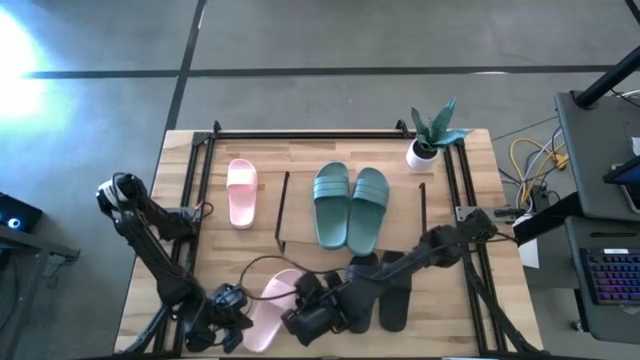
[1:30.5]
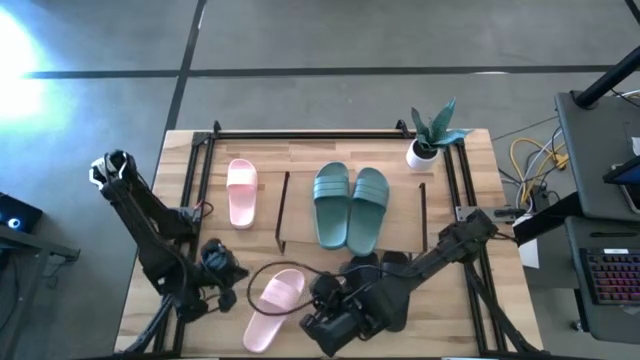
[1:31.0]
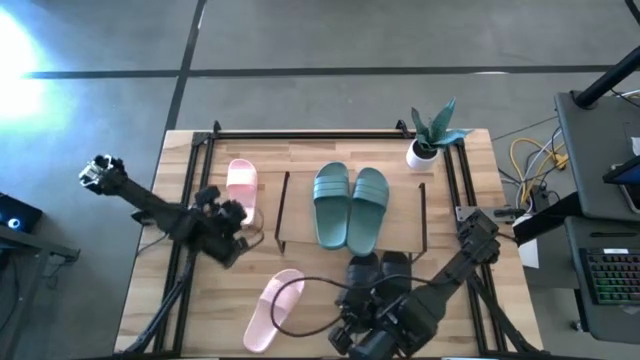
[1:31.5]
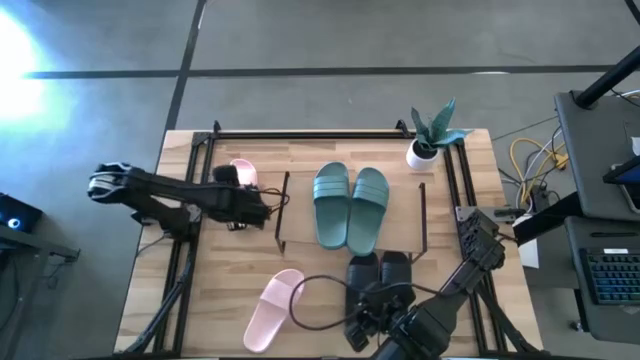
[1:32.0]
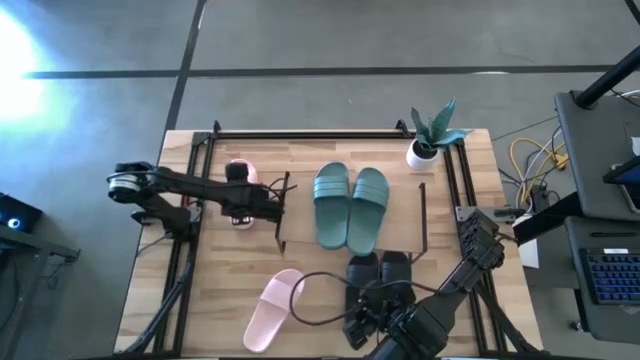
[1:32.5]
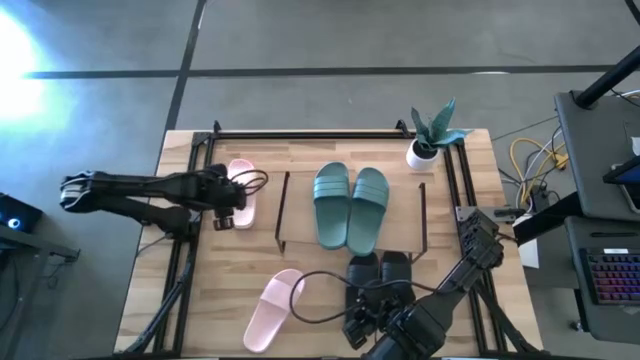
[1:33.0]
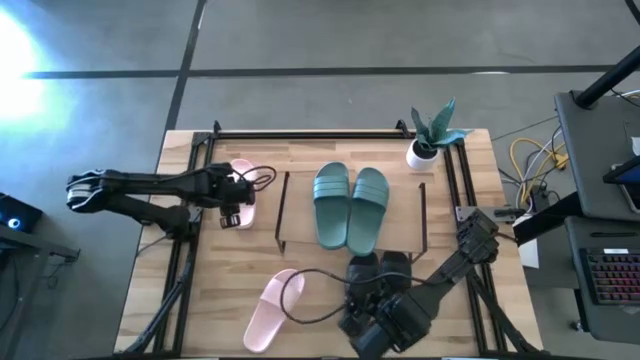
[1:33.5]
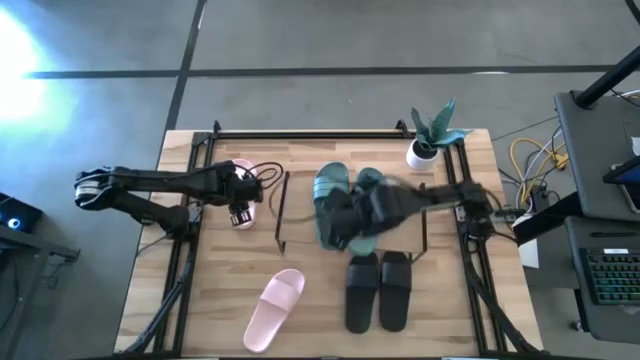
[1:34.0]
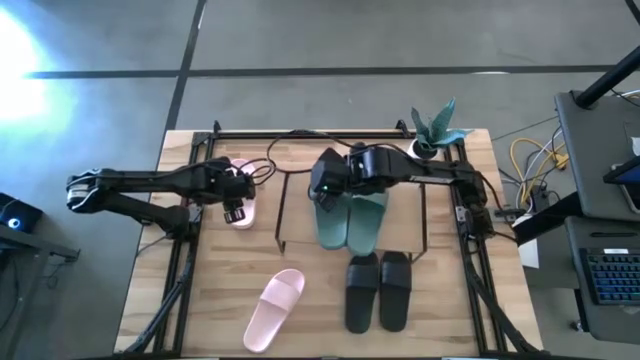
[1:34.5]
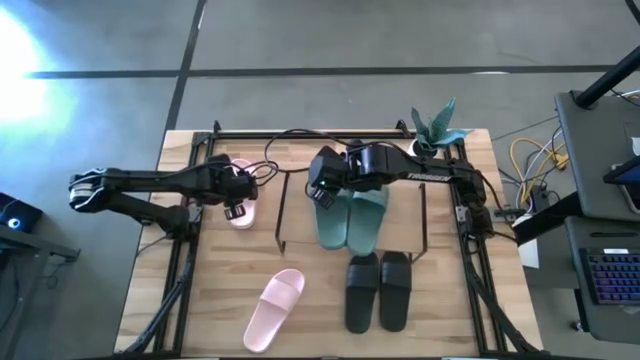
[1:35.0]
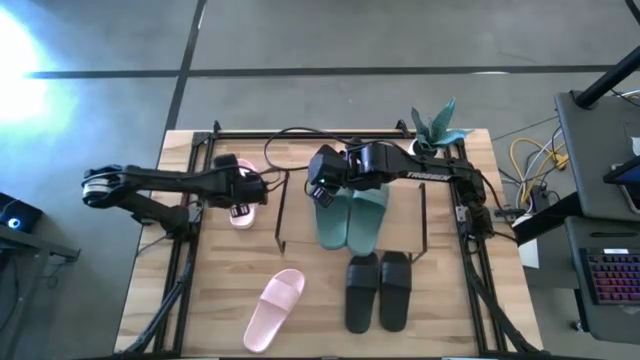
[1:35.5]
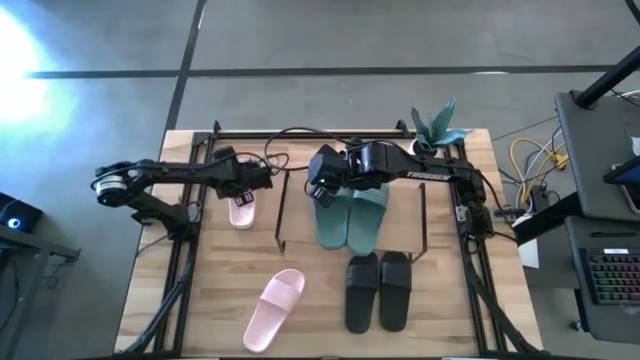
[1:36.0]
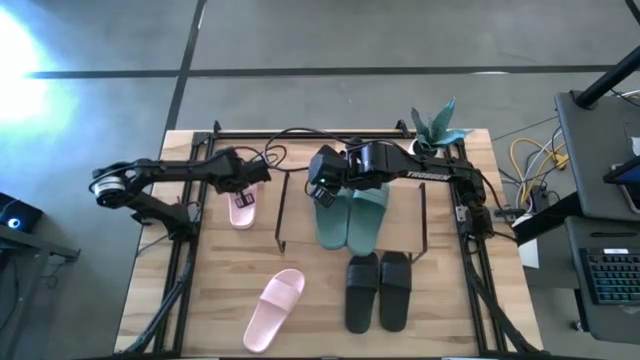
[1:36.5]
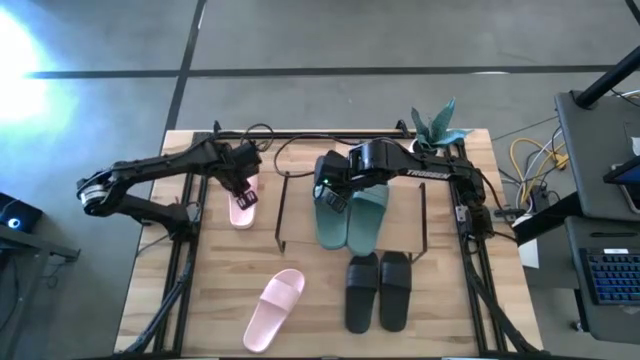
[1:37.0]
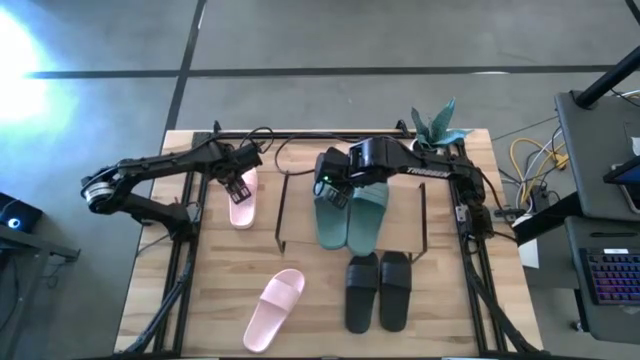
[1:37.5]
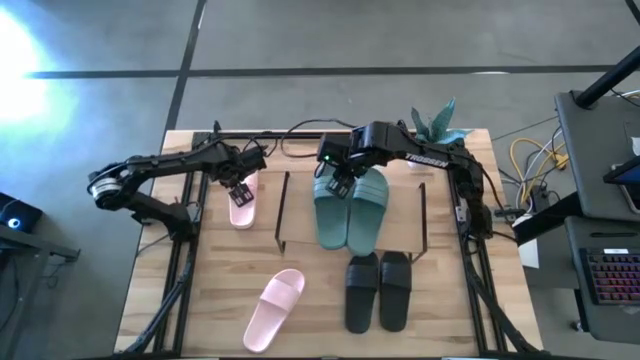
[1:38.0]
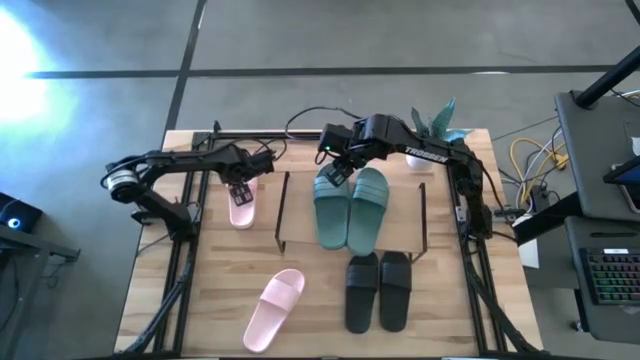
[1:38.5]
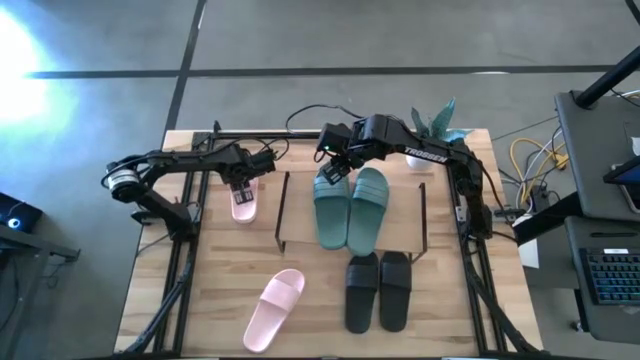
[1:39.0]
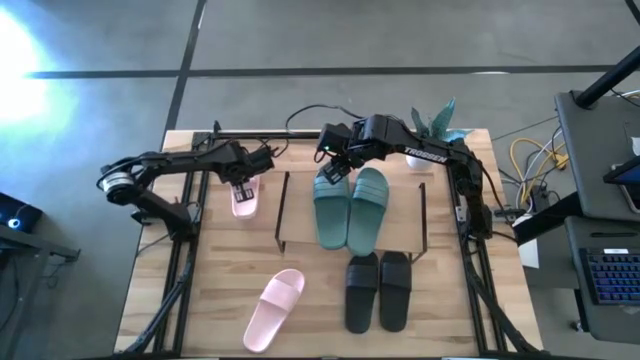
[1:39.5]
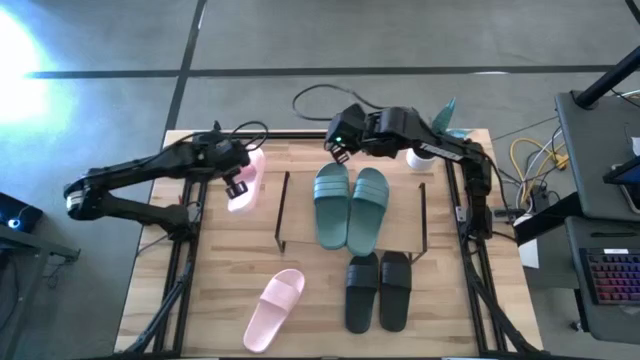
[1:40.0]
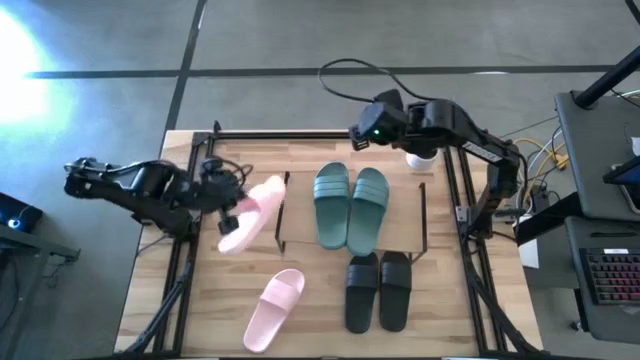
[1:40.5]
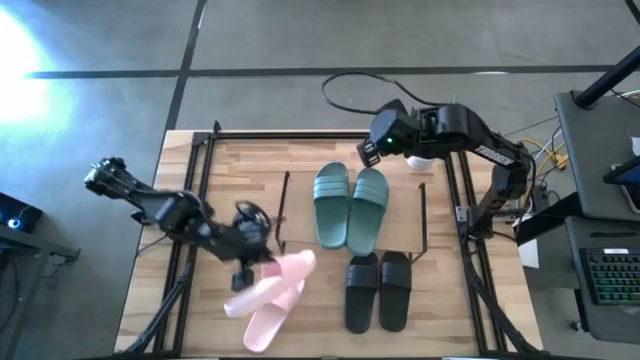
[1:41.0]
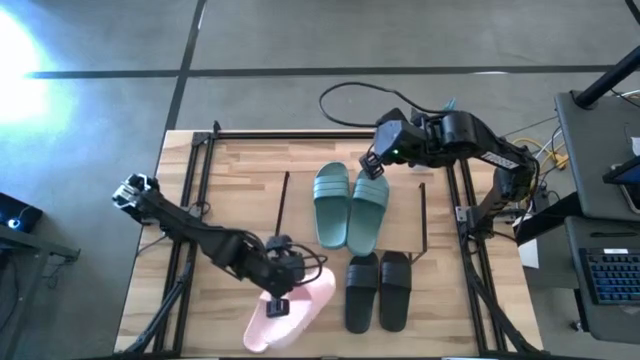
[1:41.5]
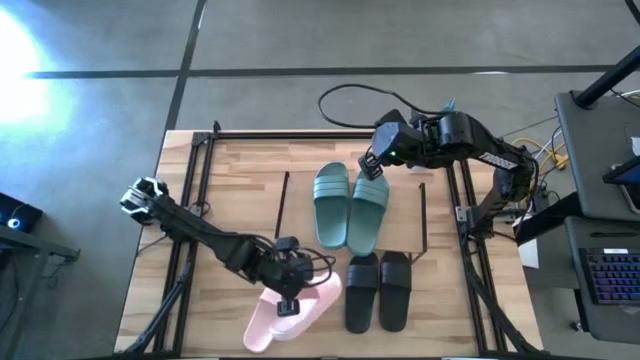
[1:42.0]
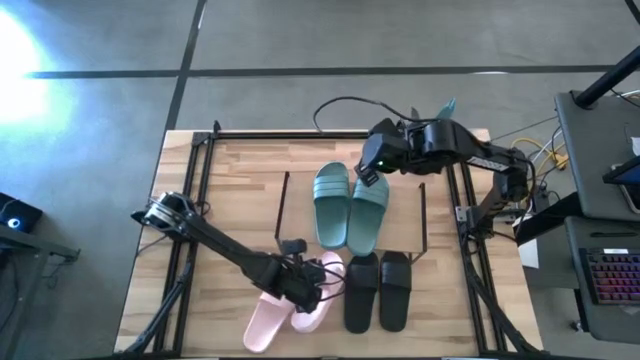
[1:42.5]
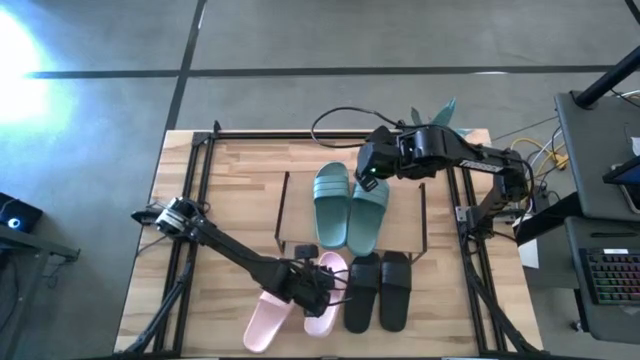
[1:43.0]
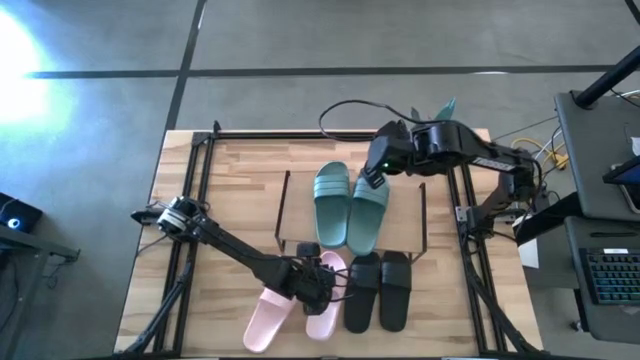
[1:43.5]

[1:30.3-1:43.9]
Task: Pick and place slides into the shelf
Put the pink slide under the shelf

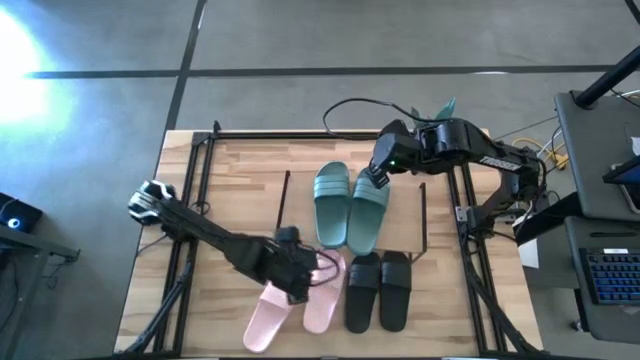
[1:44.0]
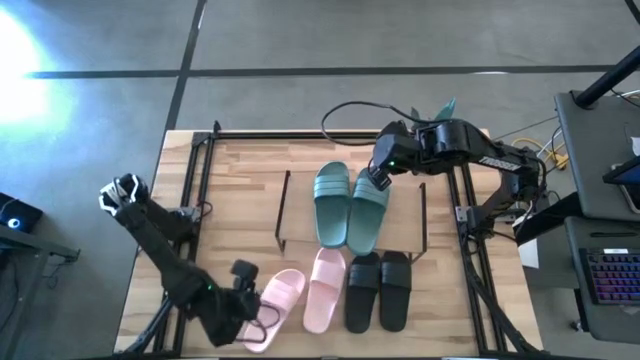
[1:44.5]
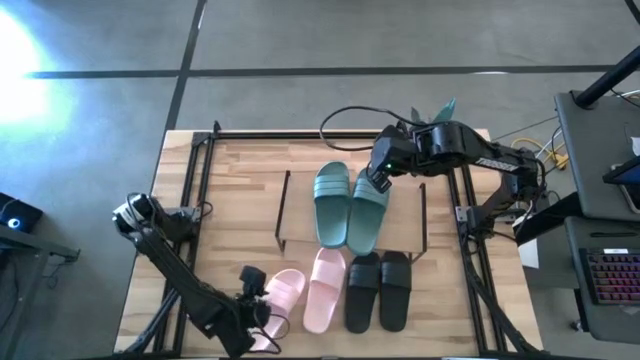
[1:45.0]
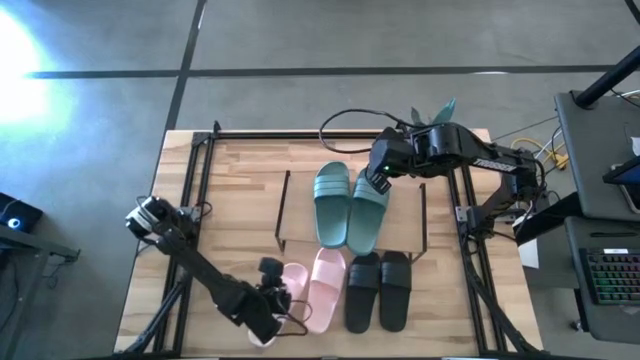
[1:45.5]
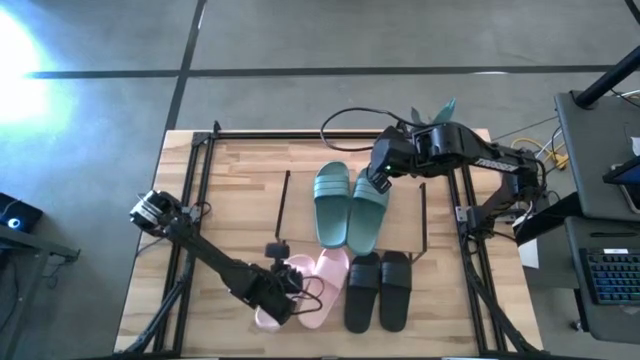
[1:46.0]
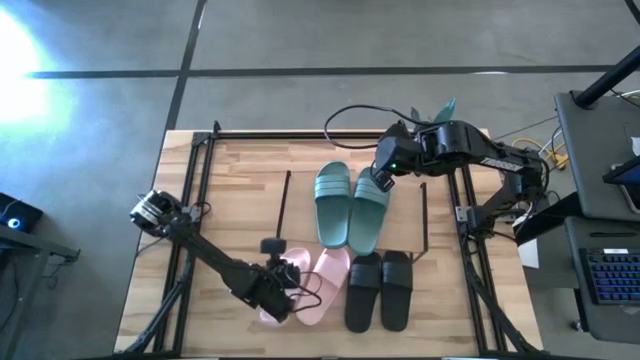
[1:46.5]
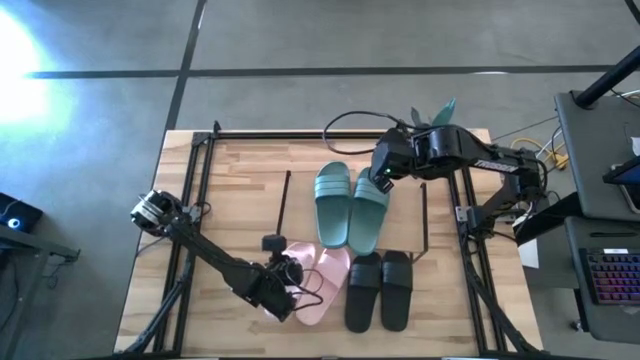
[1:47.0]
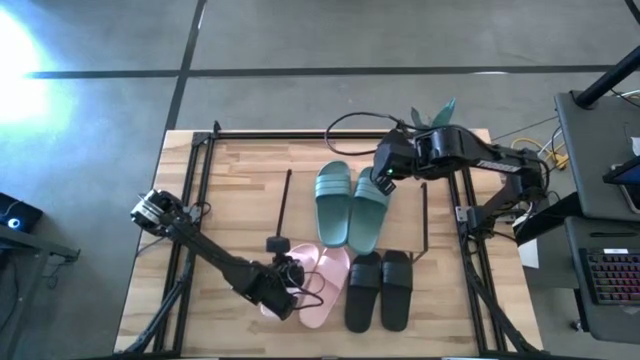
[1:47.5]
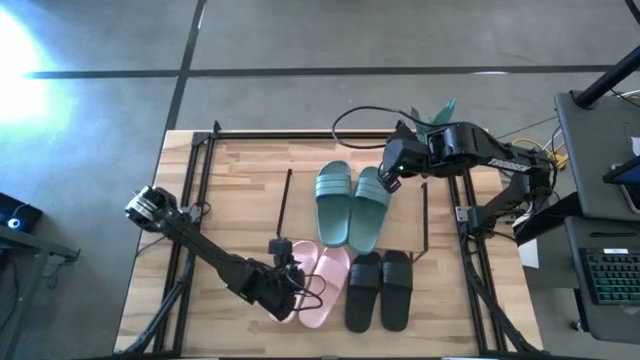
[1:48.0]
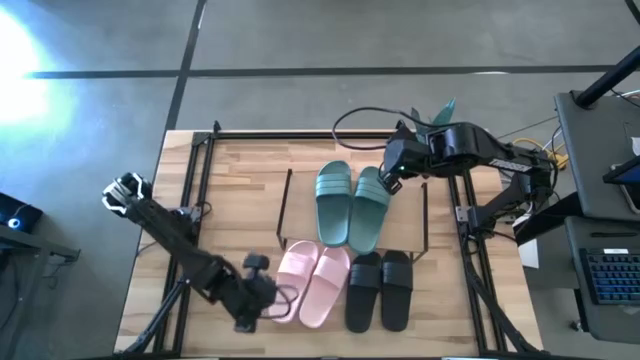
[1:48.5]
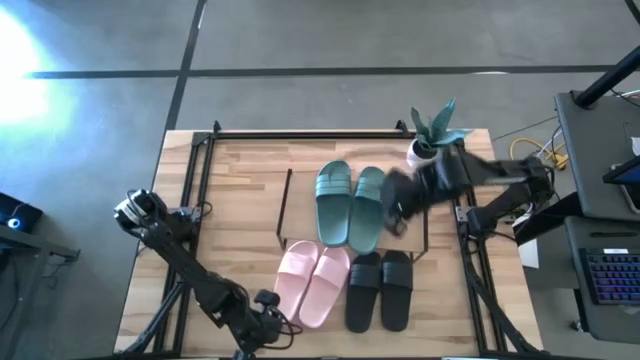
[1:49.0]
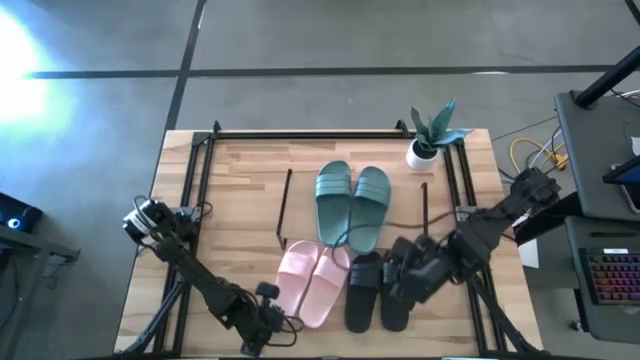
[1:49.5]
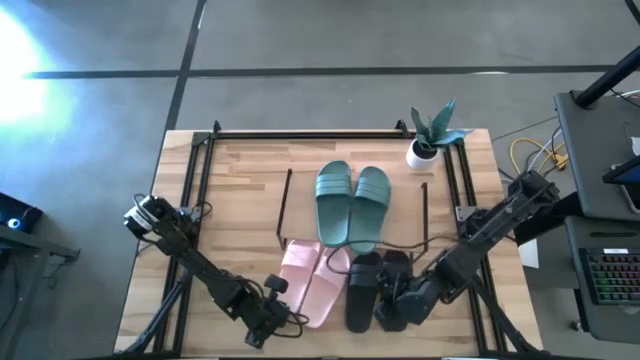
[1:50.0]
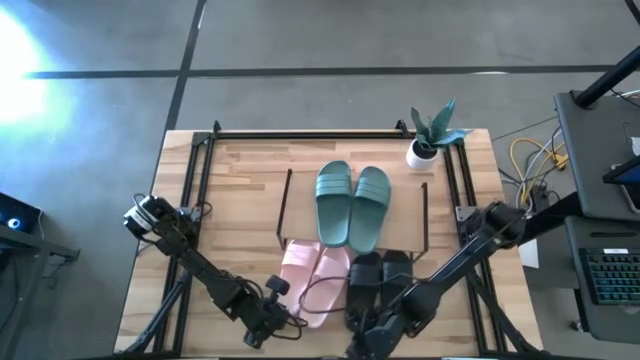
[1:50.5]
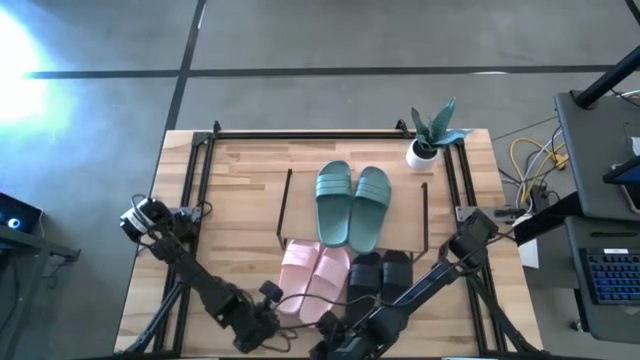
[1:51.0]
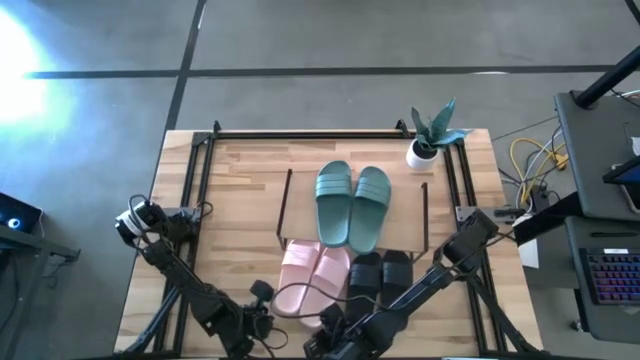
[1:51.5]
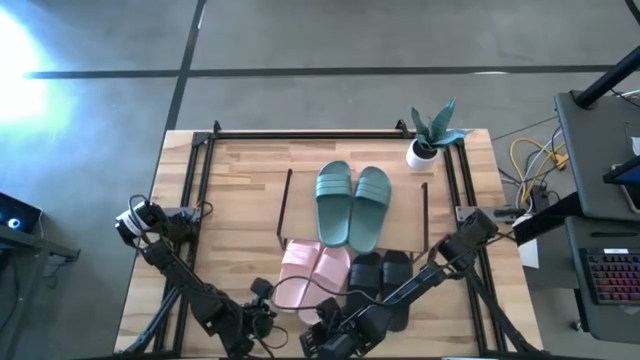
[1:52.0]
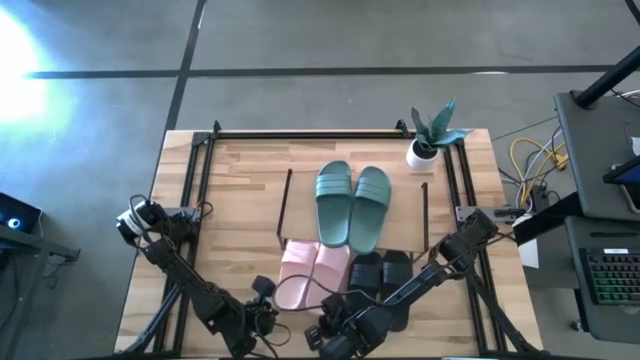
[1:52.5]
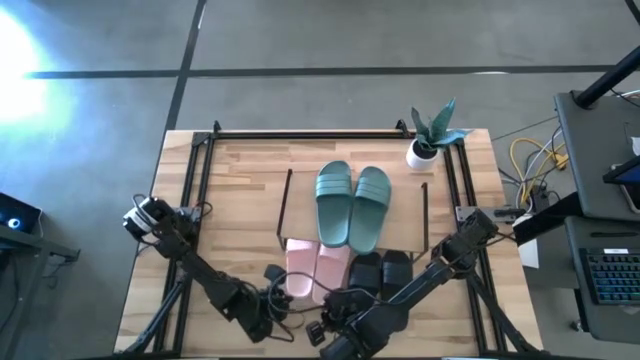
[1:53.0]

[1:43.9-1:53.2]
Adjust the pink slides under the shelf
